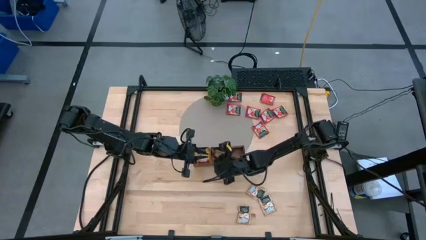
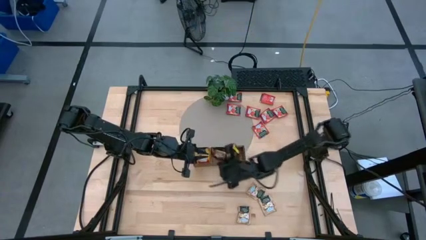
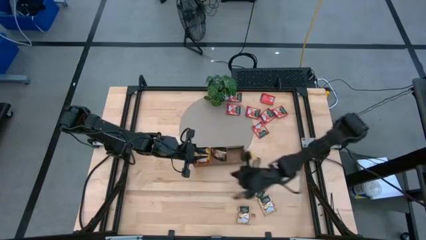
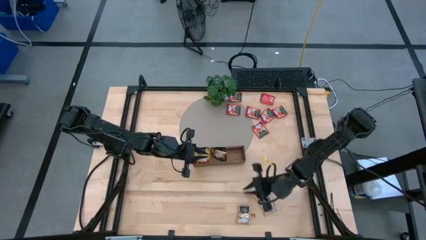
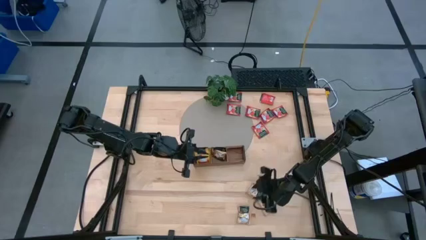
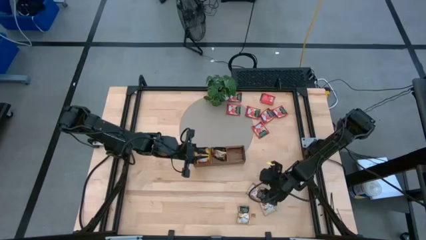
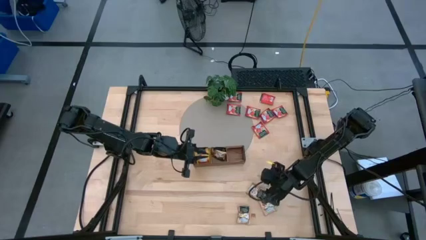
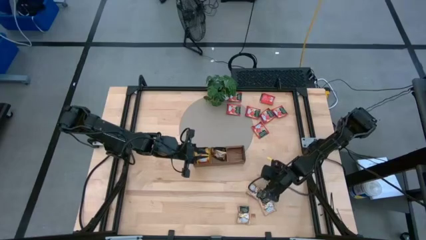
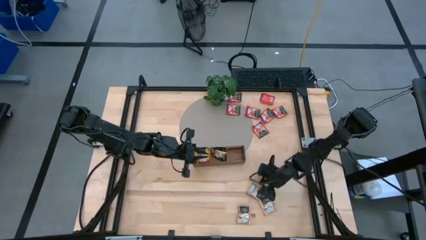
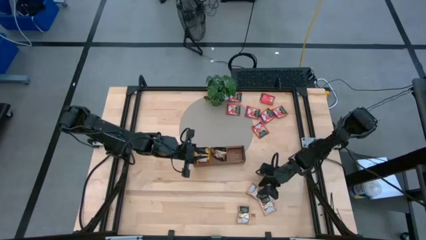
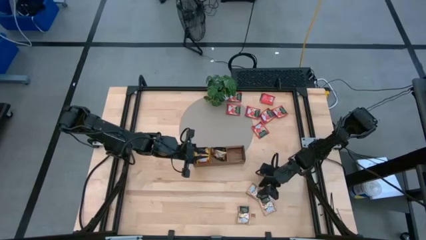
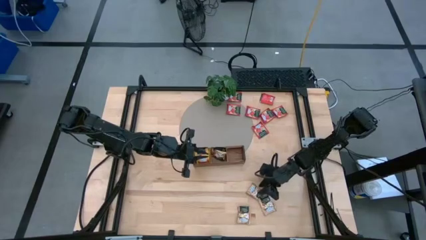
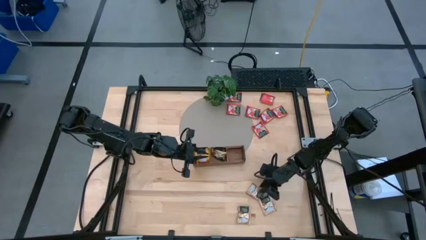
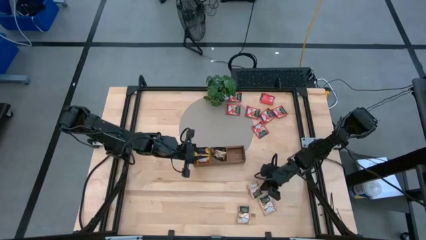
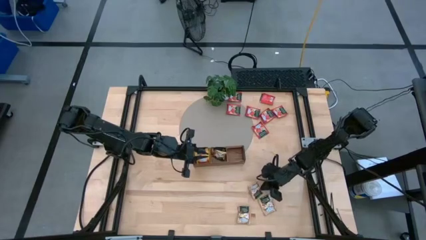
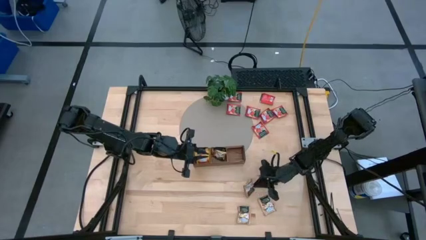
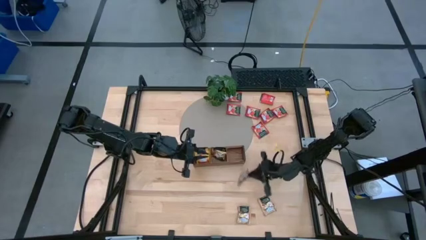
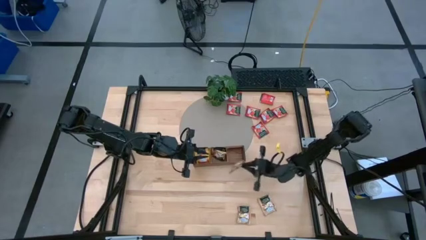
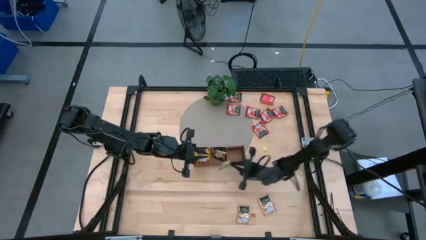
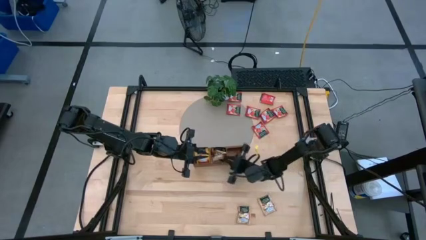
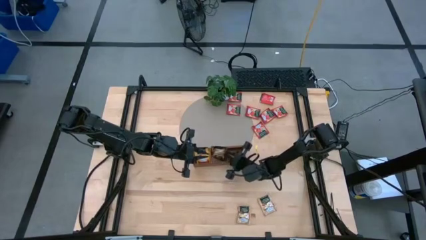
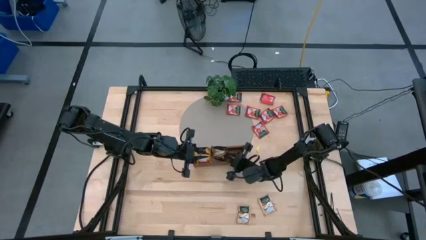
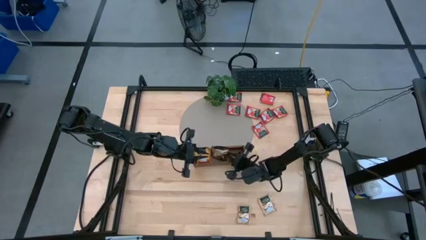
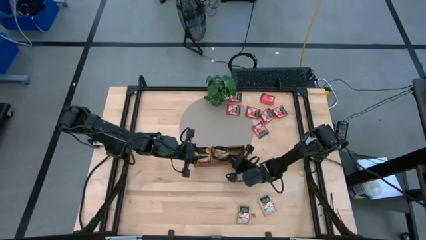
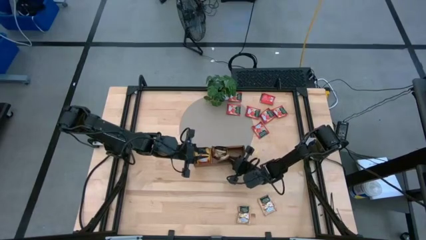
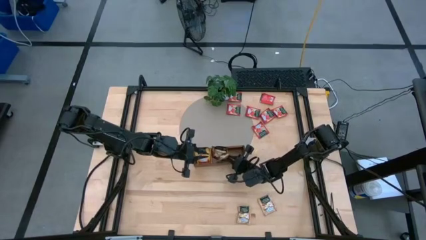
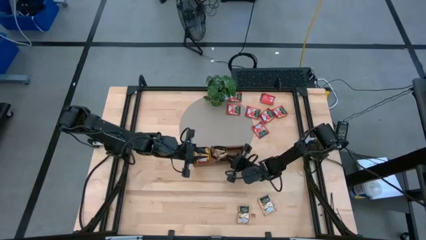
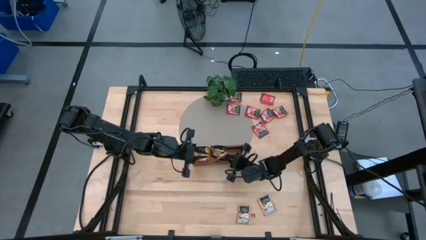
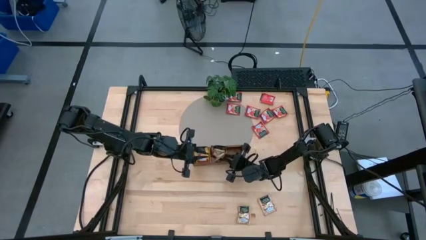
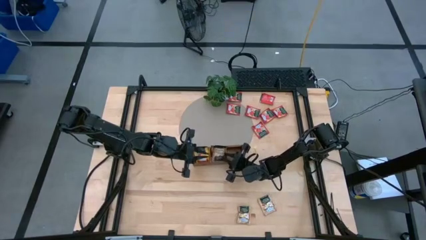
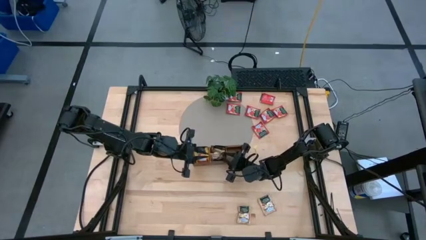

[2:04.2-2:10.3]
Task: Pick & Place Tea
Put the top right brown tea bag into the middle slot of the wooden organizer
